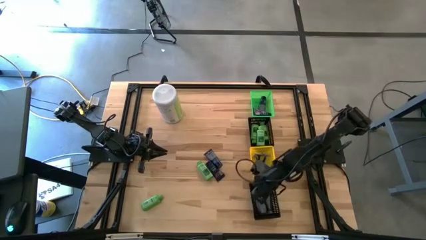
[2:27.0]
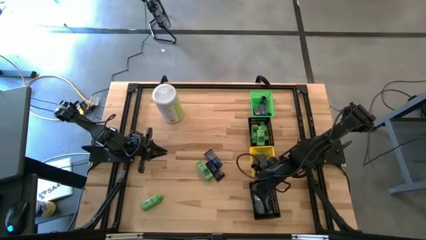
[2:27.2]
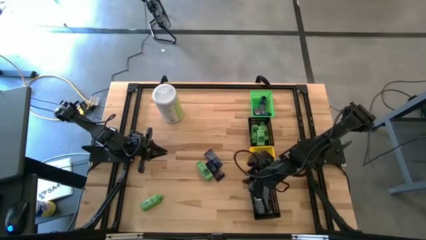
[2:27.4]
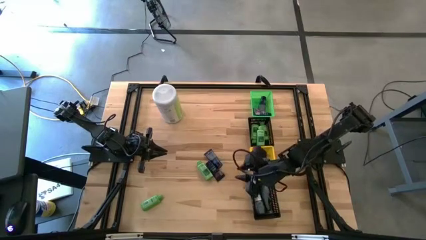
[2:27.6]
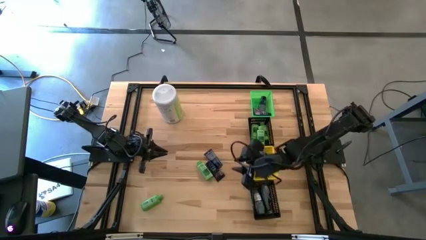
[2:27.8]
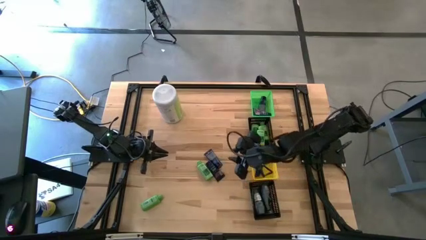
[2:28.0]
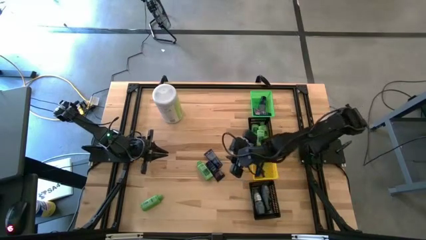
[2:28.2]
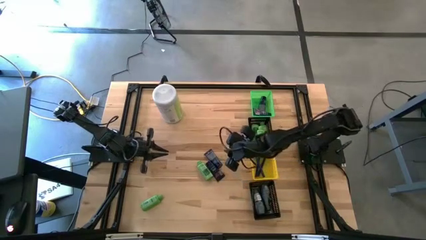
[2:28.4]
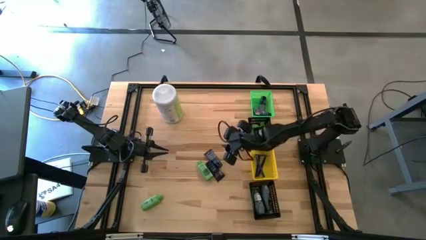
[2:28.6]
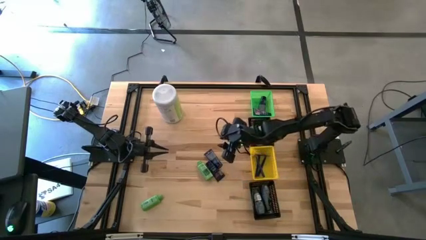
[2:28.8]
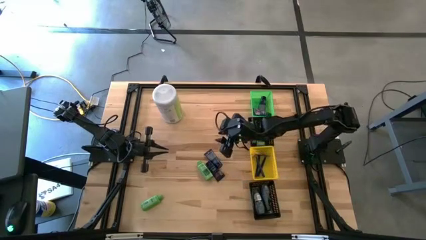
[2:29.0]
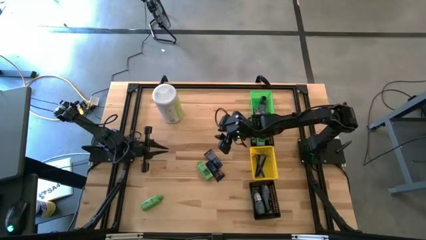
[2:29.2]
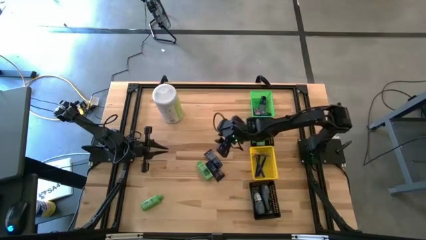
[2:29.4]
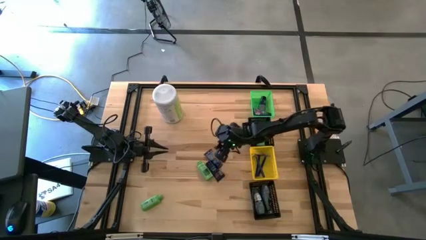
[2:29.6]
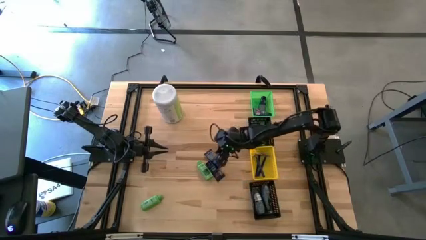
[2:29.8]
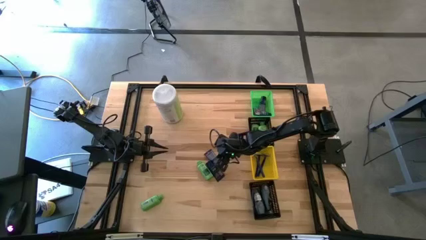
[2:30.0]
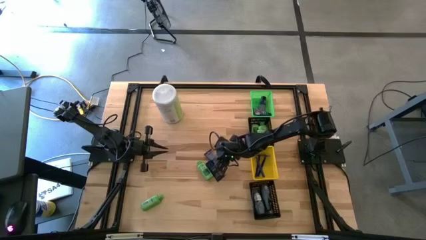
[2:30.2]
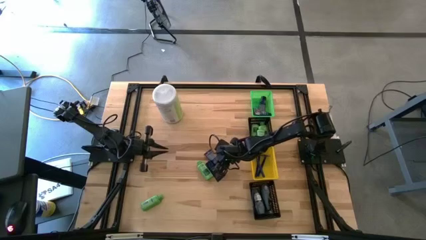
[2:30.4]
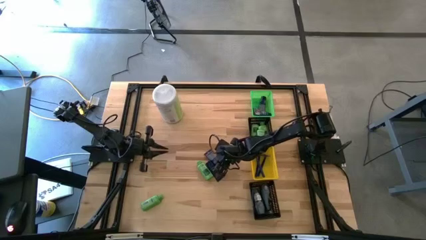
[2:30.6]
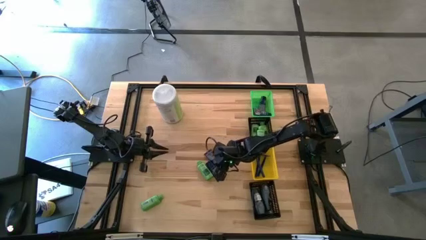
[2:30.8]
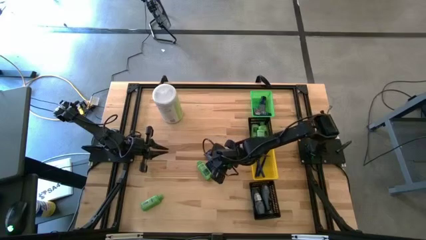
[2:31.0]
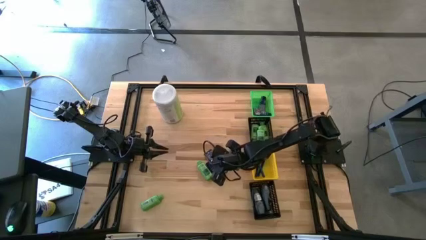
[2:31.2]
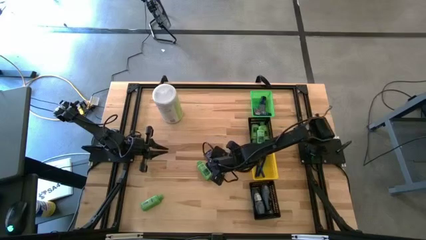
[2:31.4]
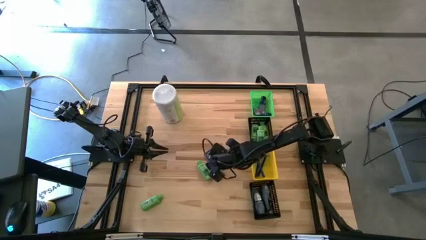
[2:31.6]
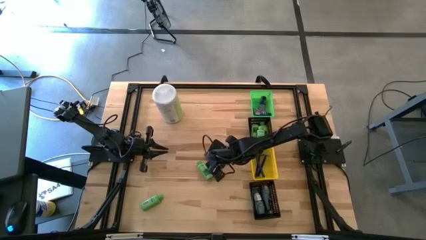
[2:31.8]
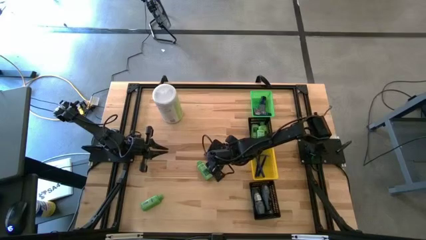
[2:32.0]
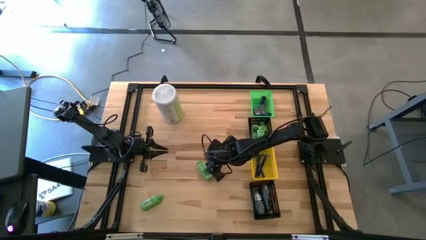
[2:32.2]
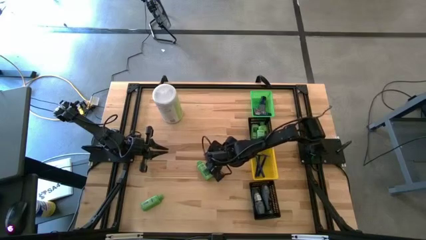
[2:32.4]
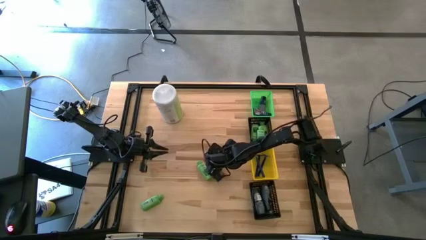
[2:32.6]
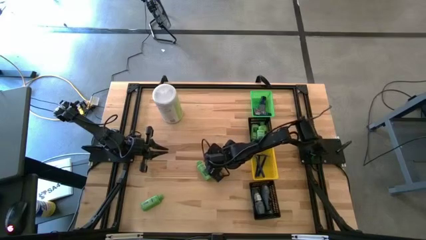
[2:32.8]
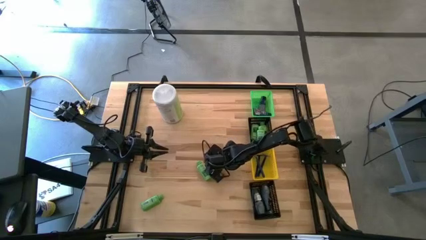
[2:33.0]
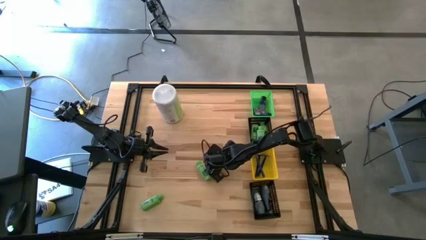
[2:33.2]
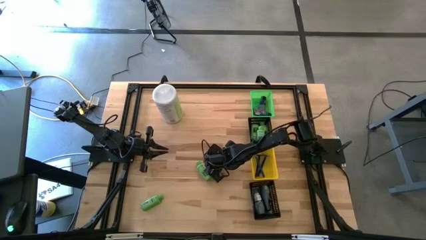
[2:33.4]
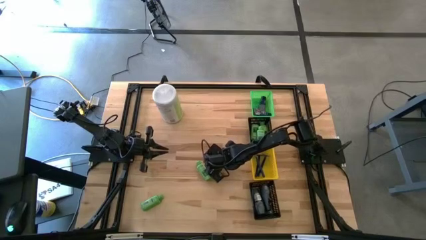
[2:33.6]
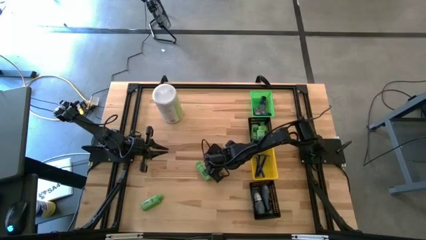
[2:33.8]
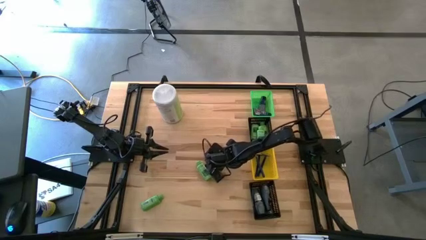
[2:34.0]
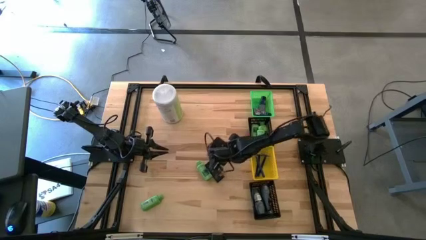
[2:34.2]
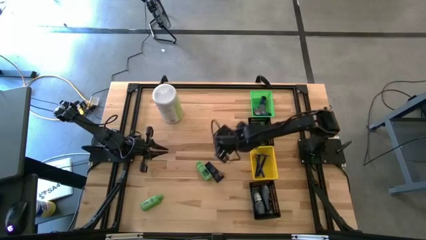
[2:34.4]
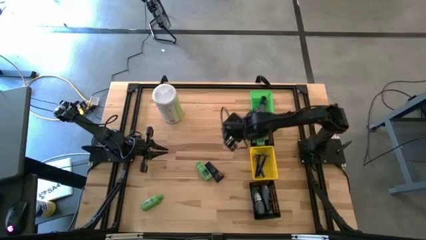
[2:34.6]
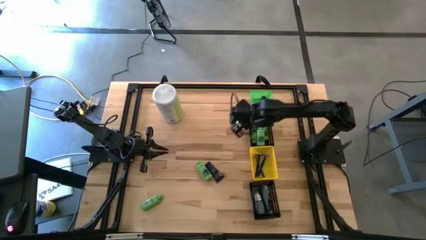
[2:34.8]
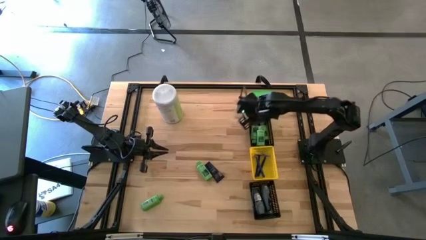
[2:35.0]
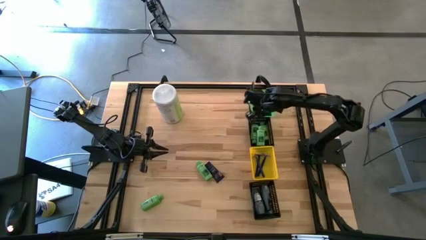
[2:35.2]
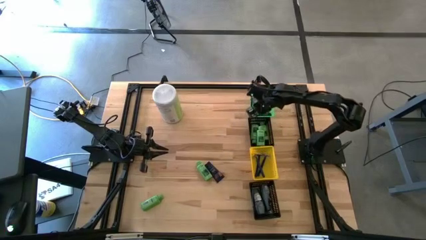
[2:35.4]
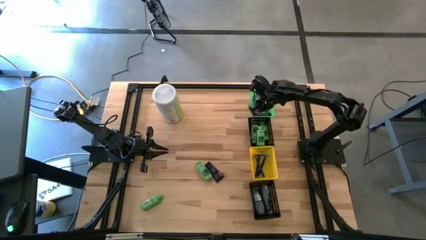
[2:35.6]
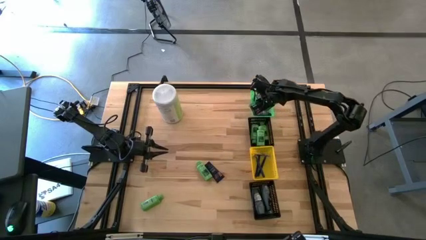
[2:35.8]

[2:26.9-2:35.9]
Task: Pick & Place Travel size toiletries
Put the blue shave cream into the green basket

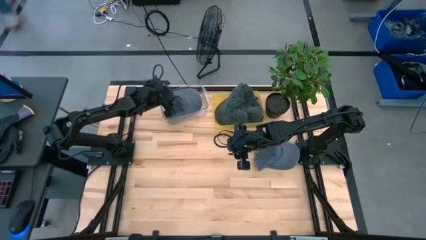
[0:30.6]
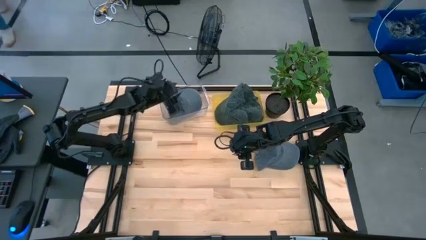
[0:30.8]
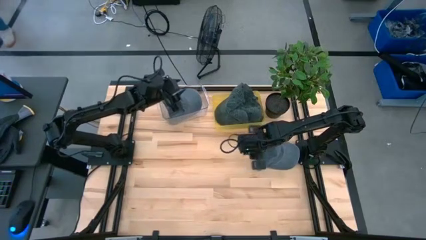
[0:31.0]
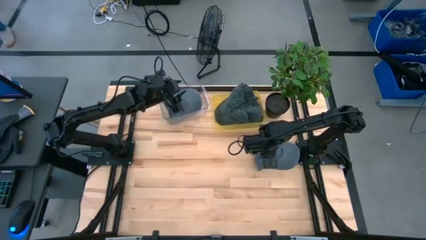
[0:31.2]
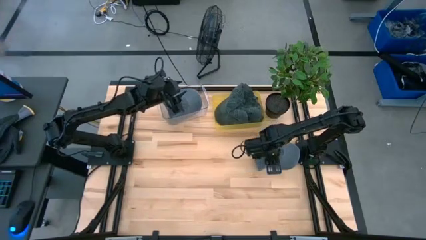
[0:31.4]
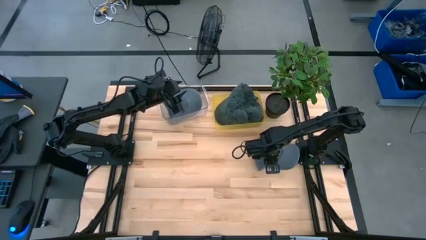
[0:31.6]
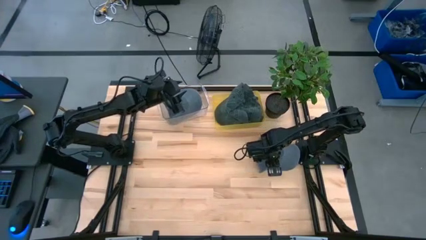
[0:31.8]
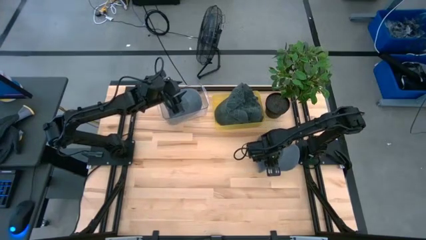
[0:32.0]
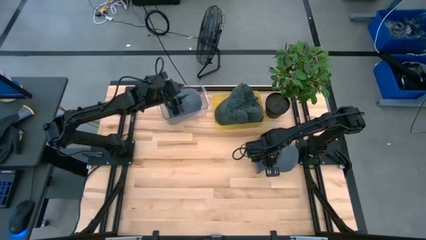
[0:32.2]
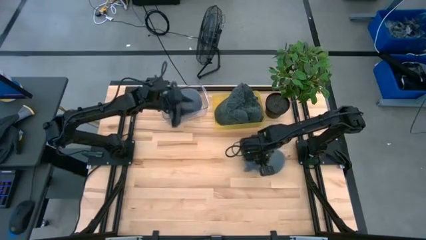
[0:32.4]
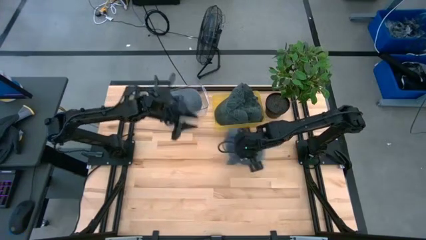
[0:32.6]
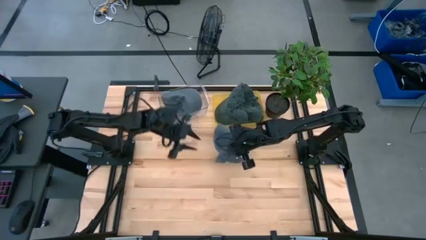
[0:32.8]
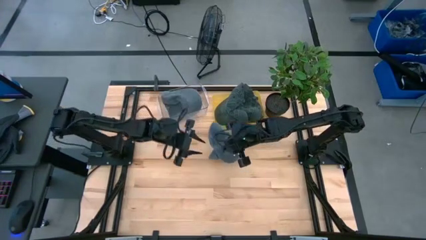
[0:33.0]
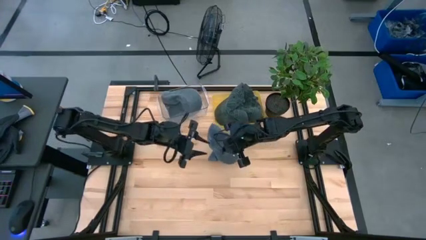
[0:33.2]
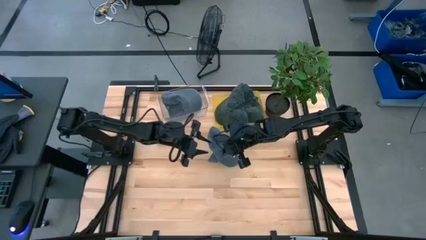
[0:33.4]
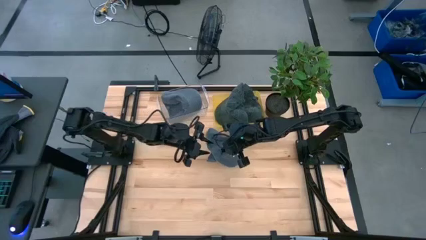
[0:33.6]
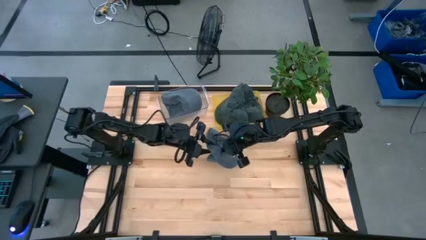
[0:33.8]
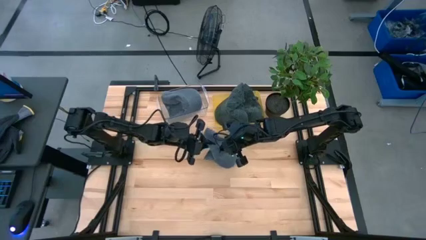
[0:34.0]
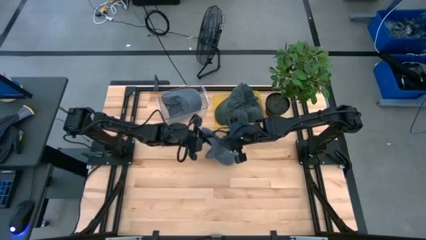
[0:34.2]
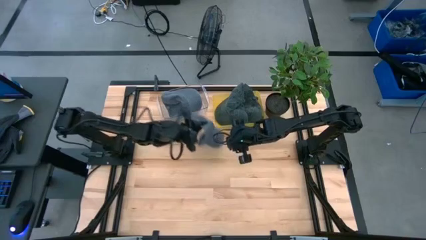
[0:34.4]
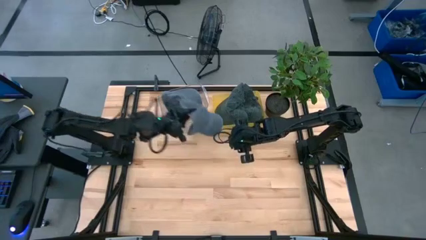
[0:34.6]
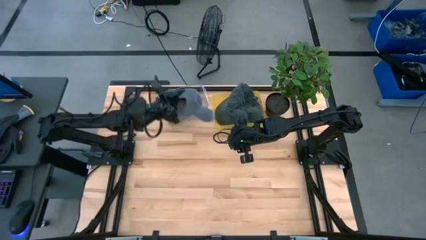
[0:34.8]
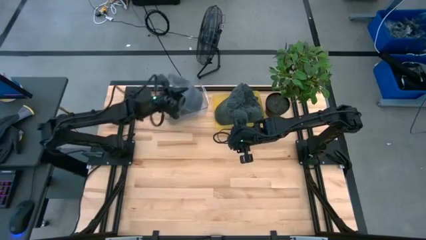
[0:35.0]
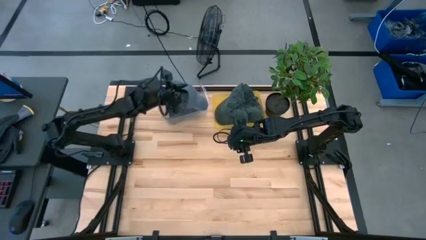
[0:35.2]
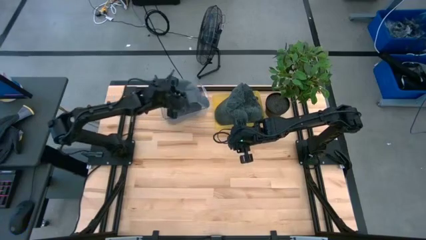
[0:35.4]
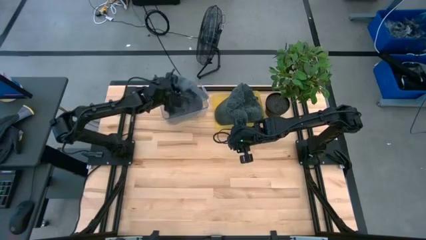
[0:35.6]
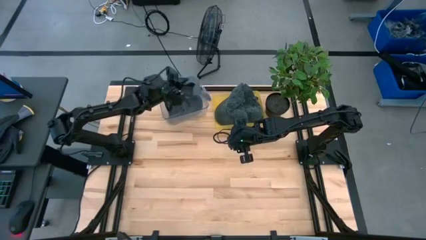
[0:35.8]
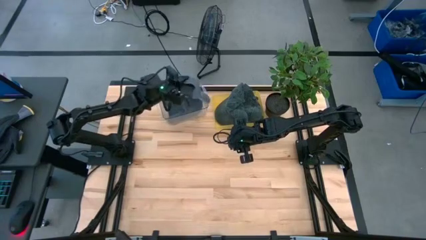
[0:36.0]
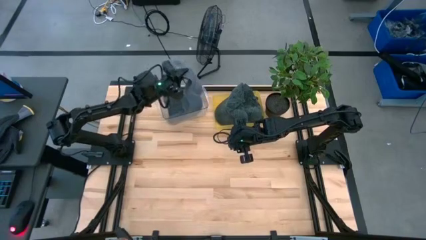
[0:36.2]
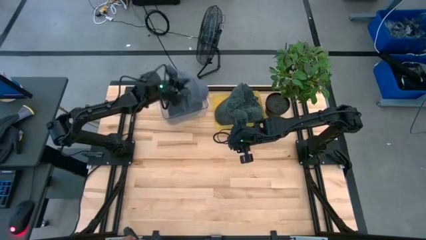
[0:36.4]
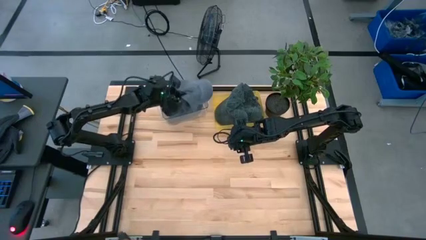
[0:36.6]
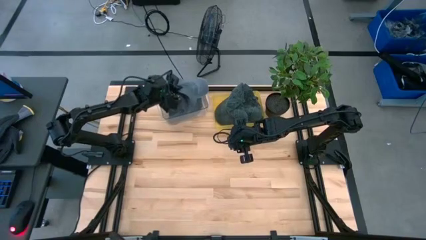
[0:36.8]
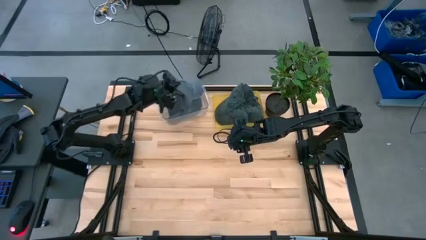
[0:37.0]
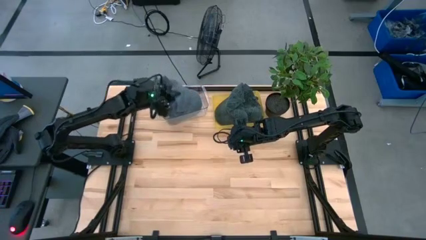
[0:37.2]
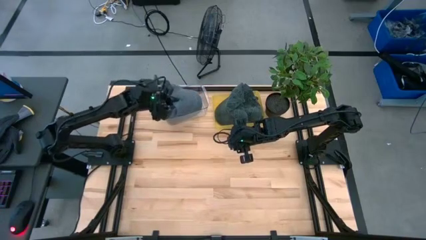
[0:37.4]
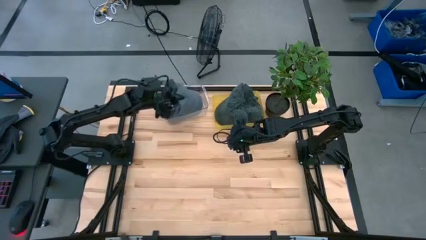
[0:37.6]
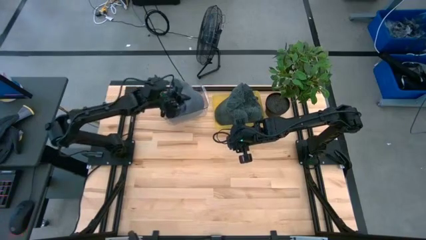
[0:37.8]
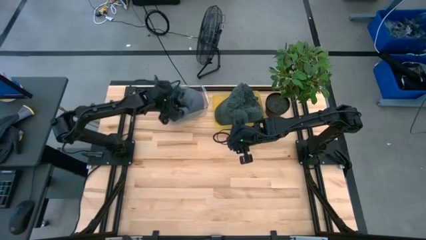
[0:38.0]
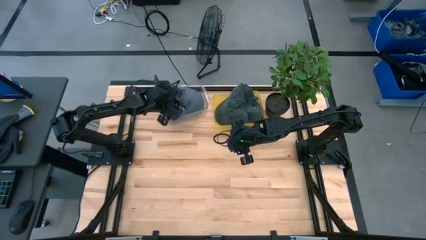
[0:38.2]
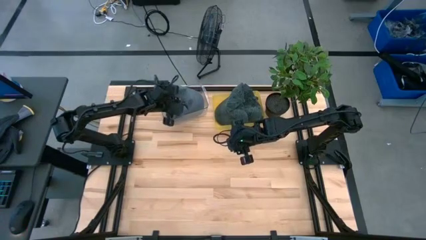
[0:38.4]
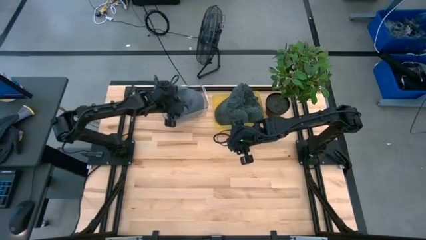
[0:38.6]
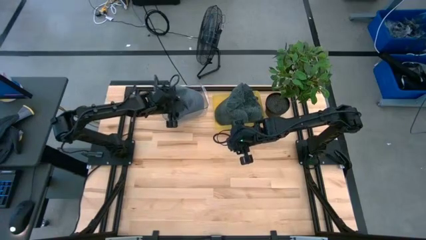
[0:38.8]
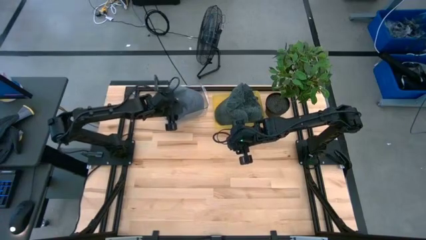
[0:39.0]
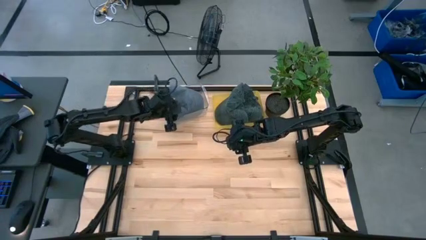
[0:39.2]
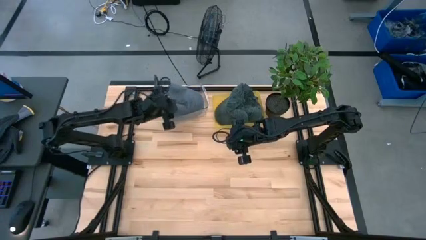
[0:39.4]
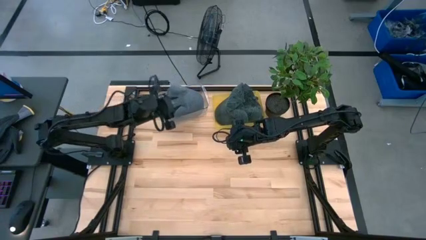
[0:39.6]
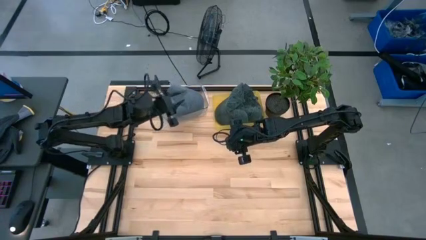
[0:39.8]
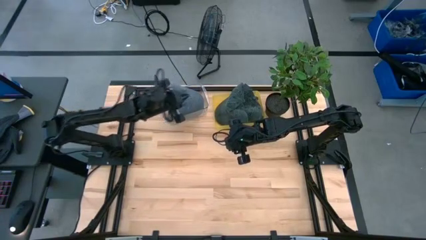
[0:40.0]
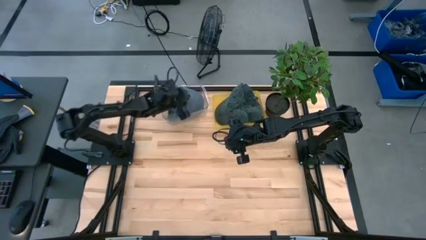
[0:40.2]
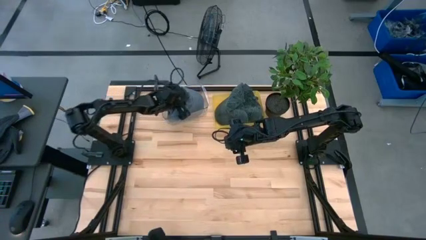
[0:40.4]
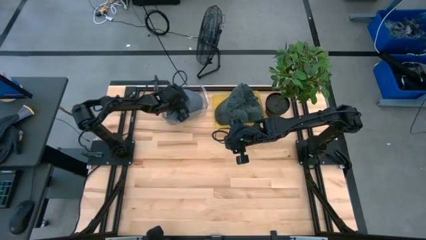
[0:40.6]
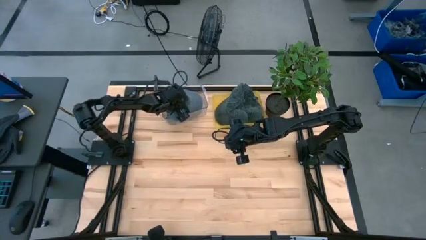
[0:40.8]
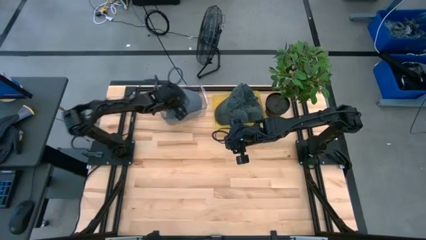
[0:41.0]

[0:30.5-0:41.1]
Task: Pick & Place hat
Put the gray cap into the transparent bin
